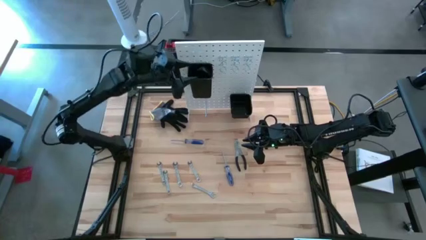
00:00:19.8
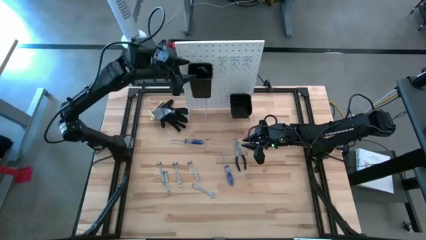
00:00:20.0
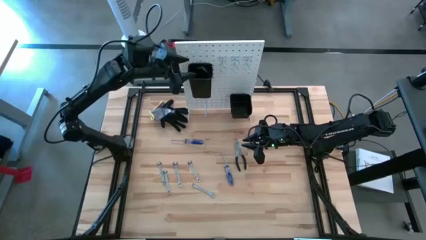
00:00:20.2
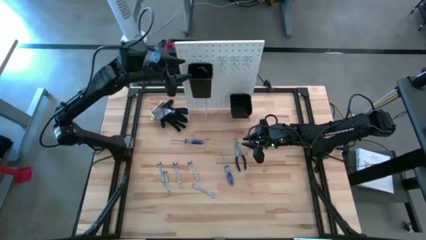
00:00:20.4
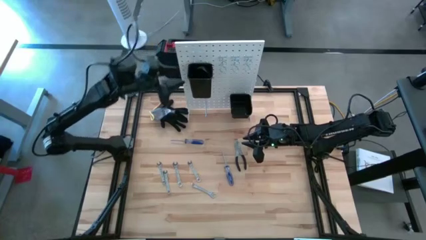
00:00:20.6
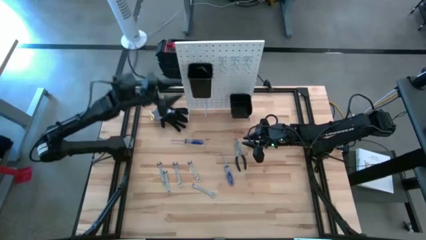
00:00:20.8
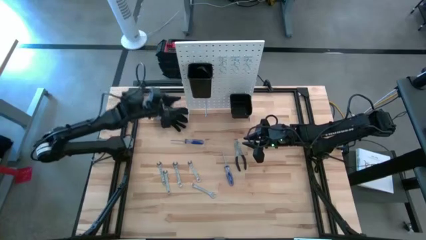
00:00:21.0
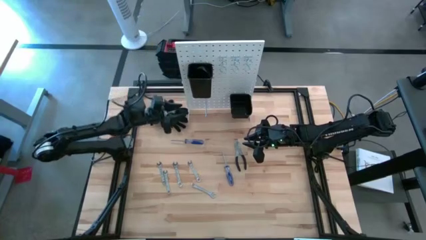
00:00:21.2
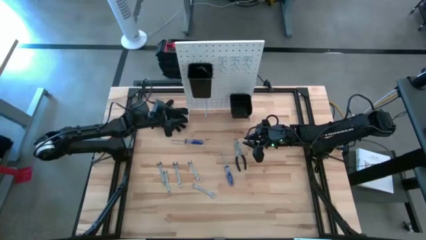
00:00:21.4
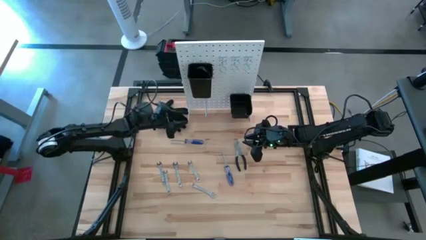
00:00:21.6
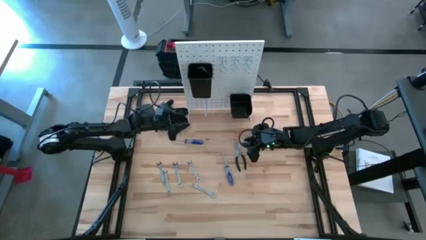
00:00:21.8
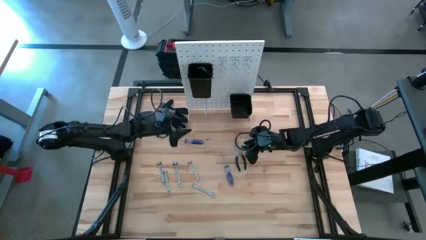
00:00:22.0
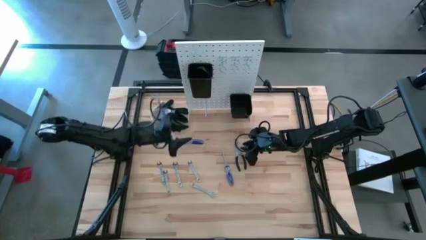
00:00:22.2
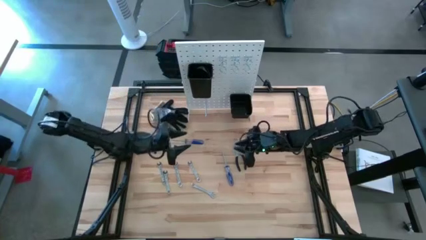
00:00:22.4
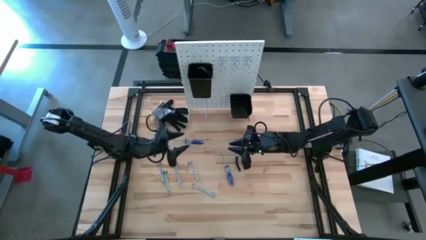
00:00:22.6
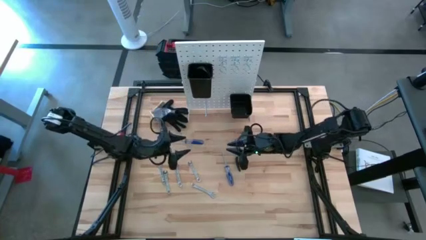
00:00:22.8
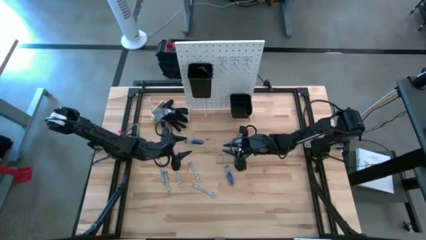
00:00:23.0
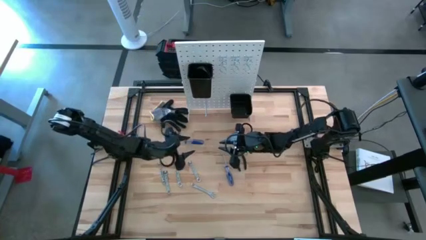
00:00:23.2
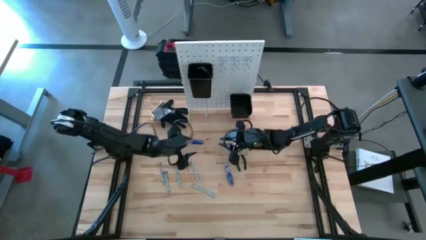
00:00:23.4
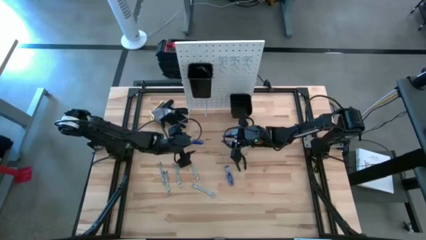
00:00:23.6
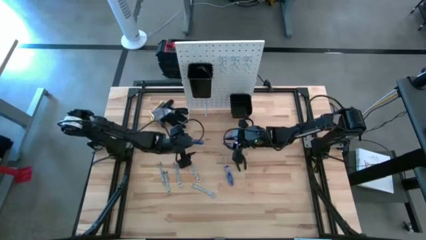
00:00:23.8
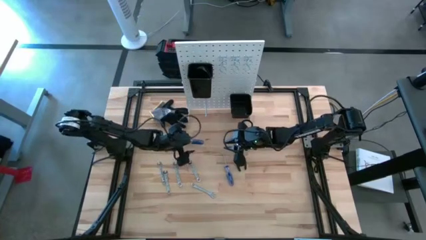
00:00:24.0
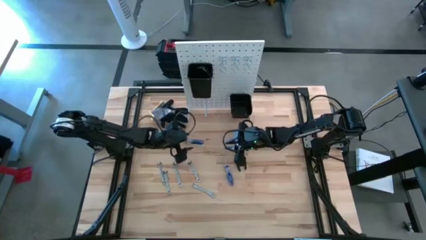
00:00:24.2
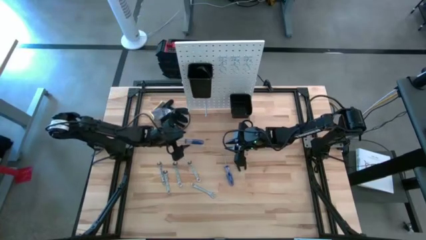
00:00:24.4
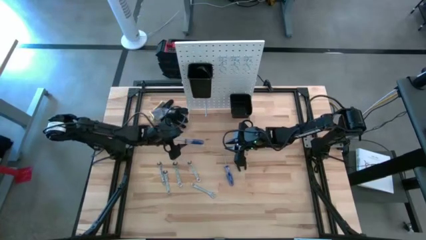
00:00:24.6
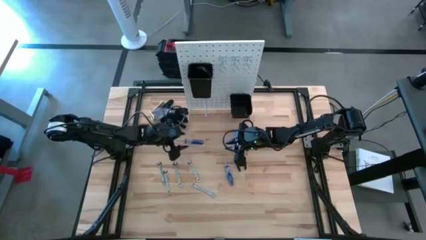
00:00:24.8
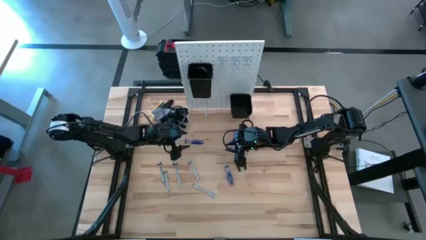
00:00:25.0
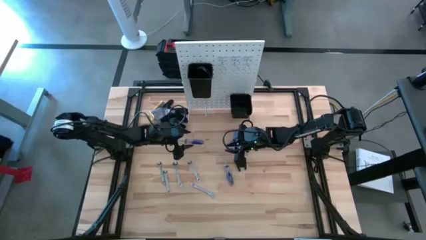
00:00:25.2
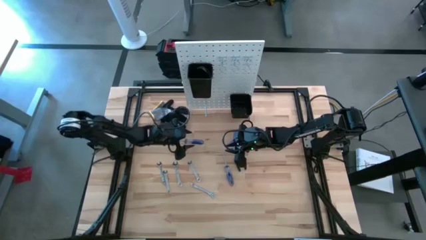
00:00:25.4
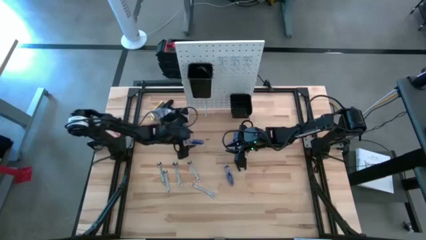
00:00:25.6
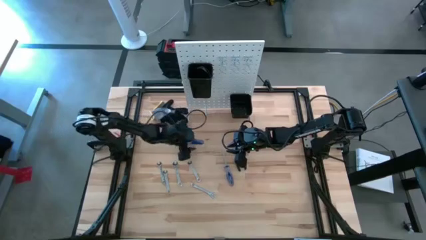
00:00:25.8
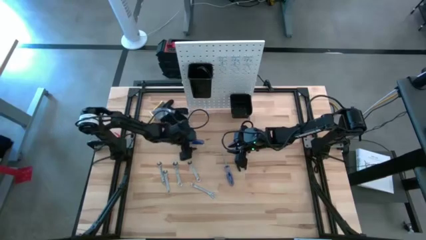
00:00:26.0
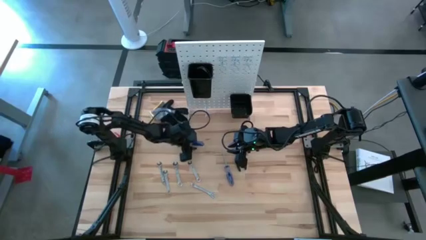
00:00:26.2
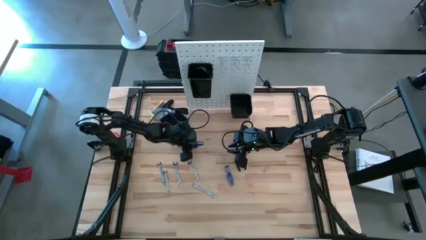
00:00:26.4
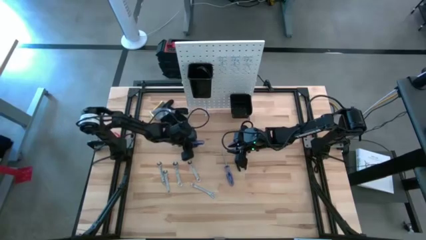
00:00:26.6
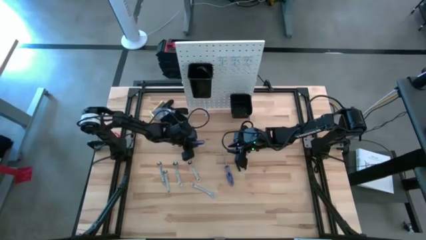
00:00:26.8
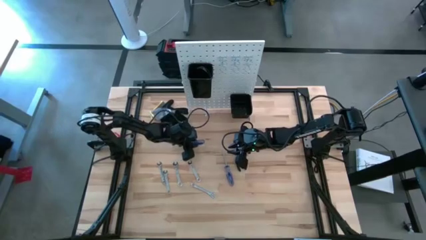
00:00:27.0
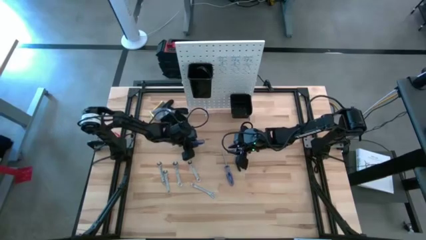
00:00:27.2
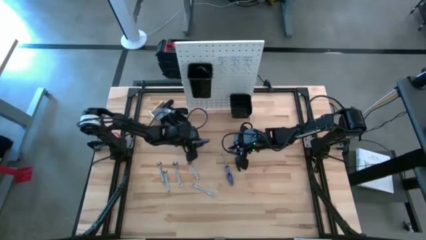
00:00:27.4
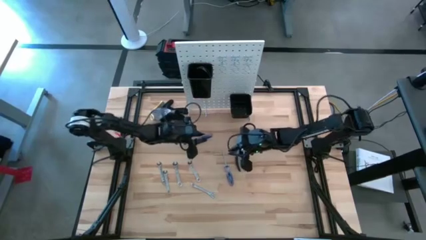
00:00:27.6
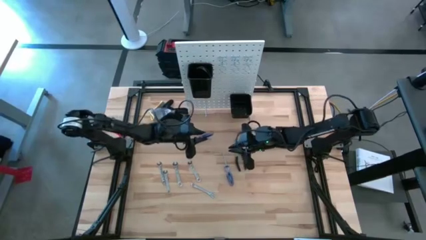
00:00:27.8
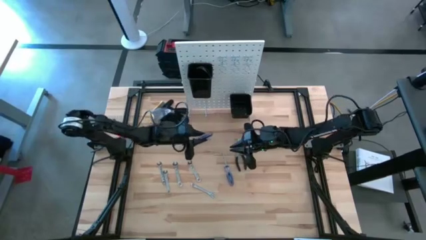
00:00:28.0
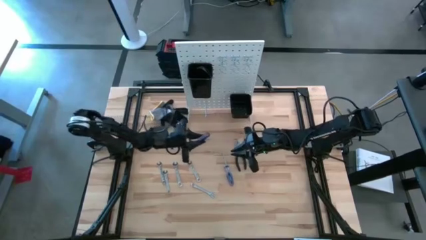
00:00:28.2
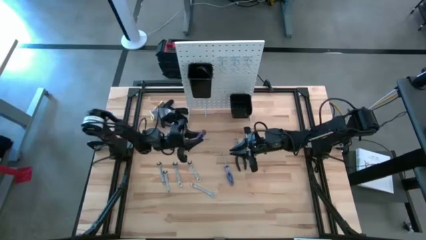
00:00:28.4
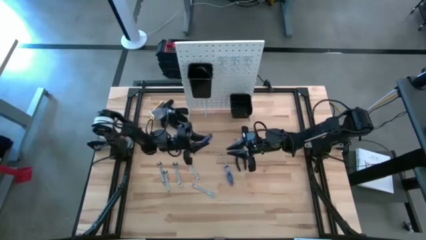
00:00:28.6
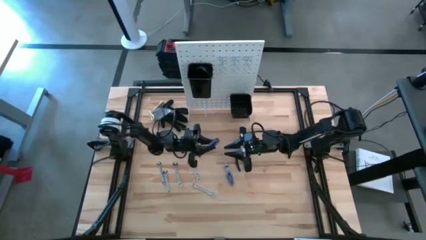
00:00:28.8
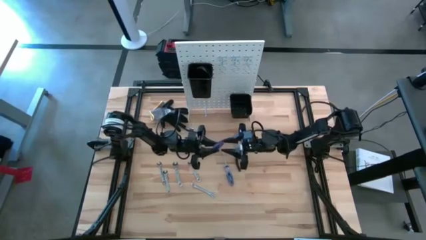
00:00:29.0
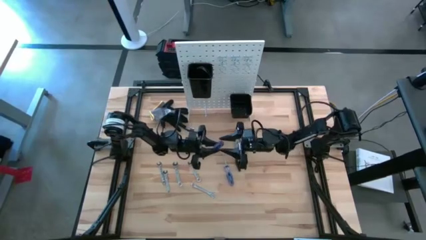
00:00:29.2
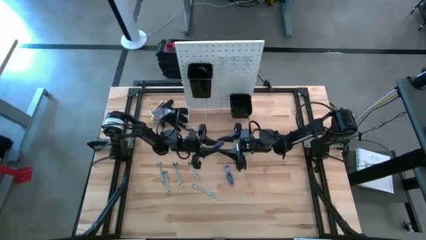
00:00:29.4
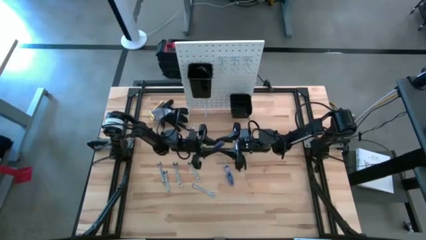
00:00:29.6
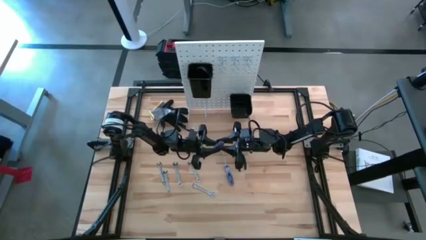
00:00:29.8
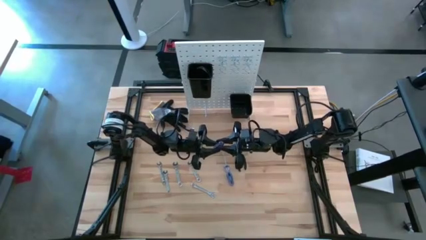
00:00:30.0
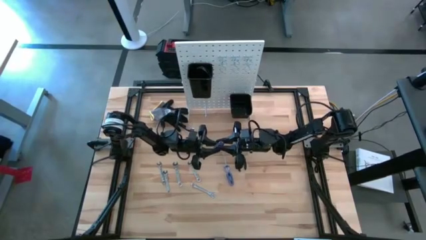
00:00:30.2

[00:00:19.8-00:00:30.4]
Task: Hang tools onto peg board
Hang the blue screwdriver on the peg board
